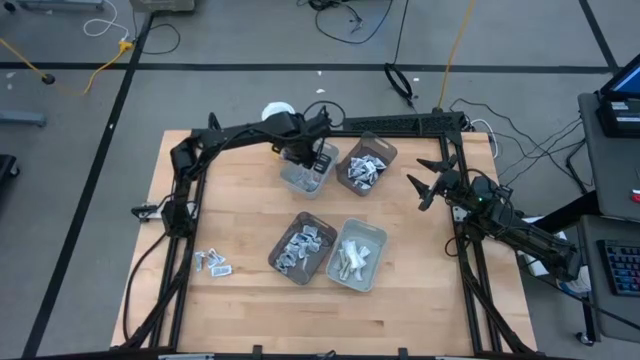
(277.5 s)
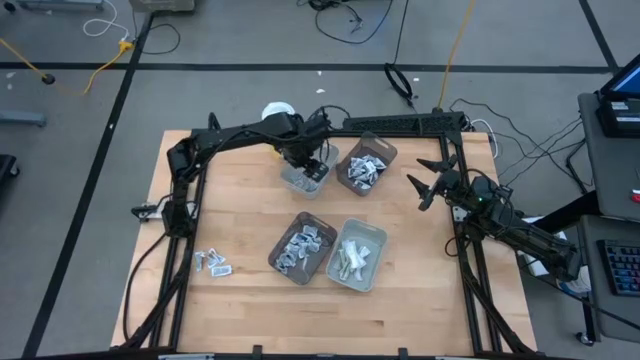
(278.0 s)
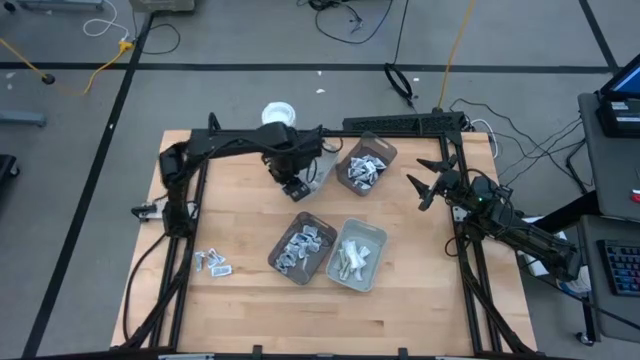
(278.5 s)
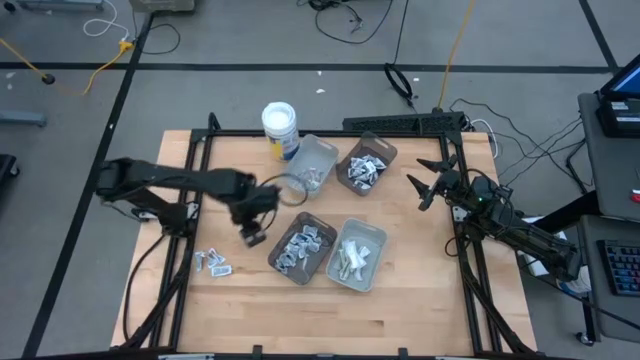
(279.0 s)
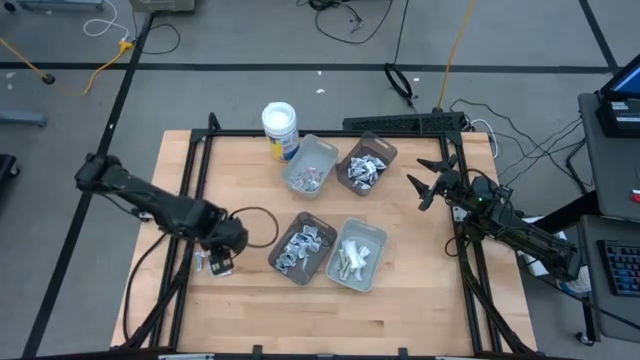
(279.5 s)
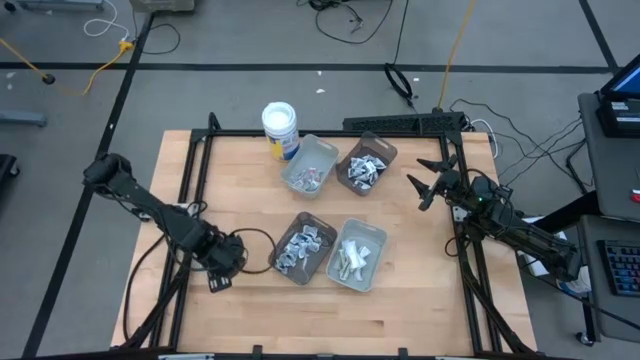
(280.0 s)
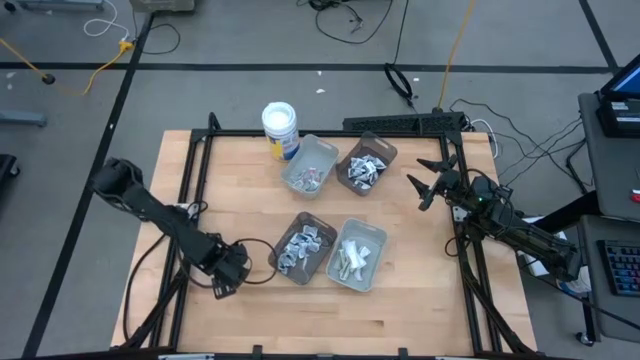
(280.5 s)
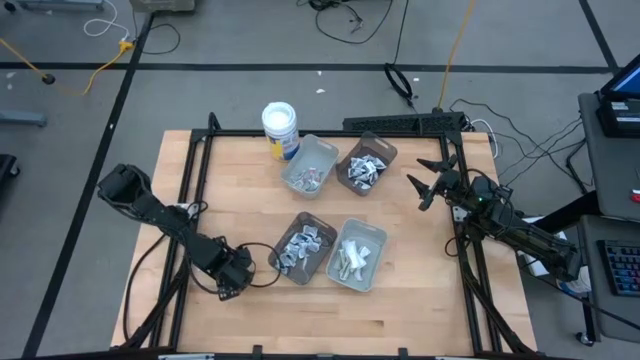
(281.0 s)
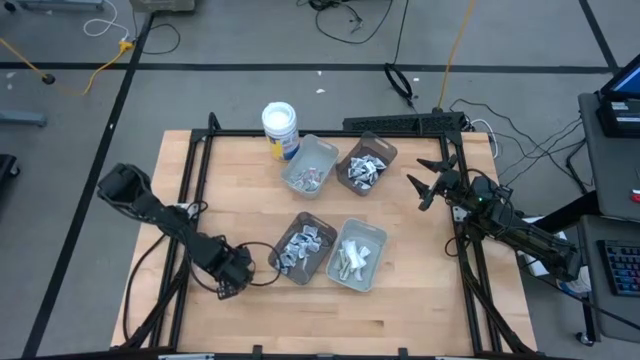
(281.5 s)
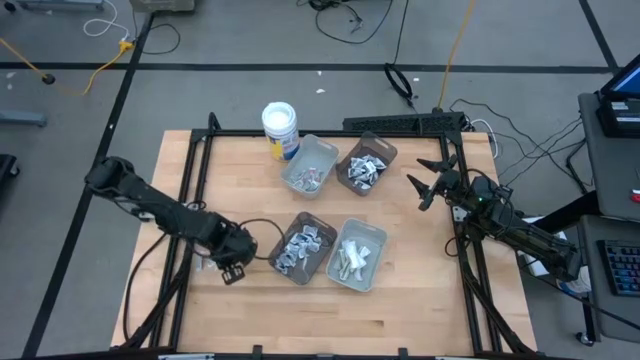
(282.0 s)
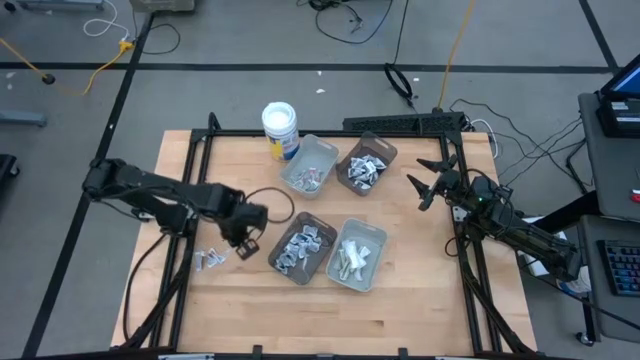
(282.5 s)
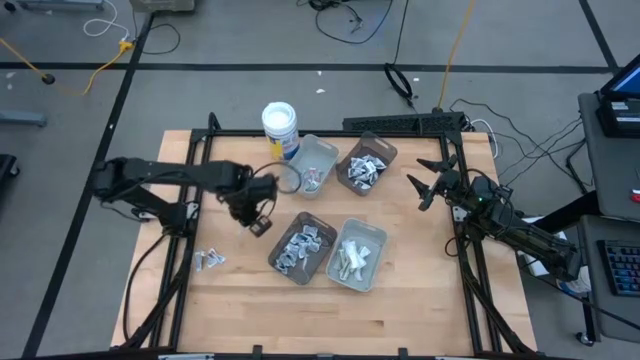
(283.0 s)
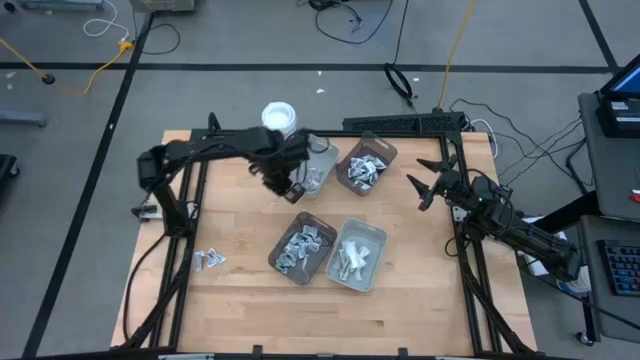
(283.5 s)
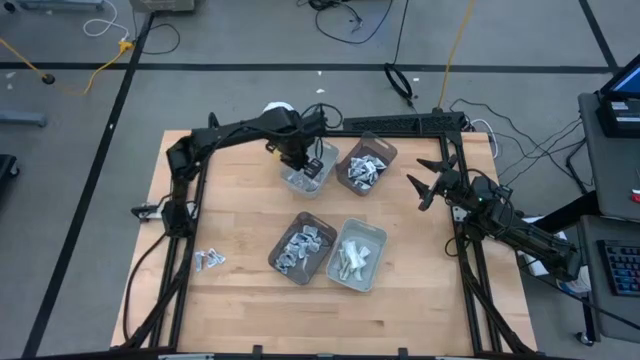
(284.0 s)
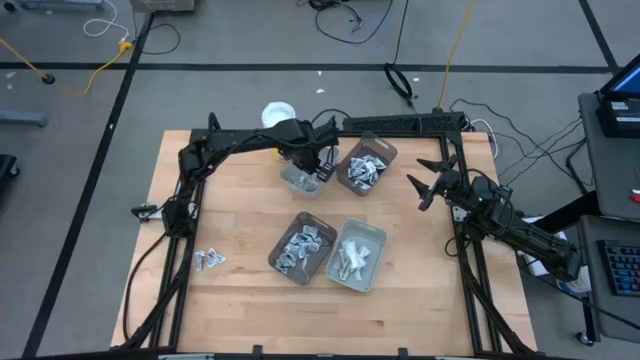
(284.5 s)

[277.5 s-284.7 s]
Task: Pick & Place First Aid Supplies
Put the orange ointment pack into the top gray bin

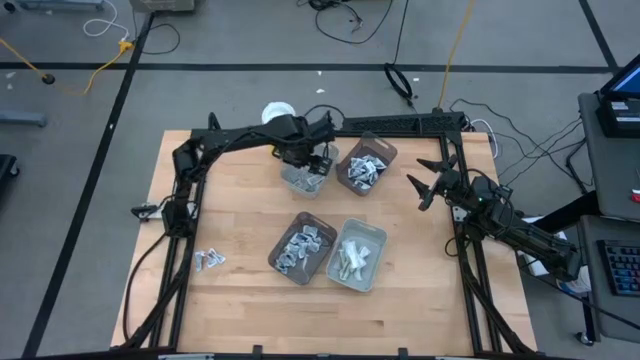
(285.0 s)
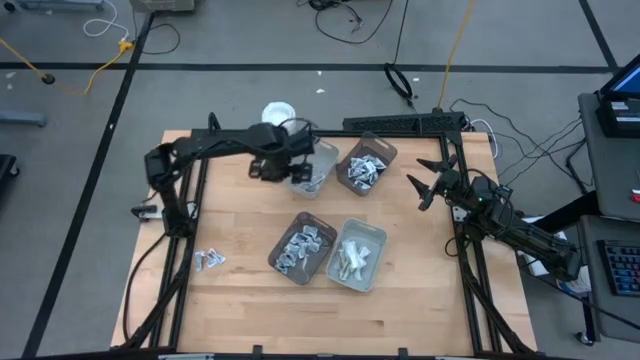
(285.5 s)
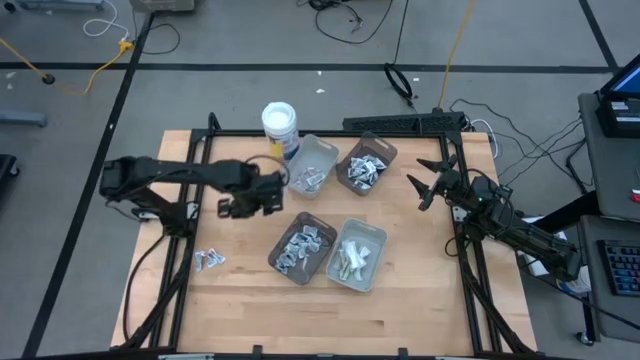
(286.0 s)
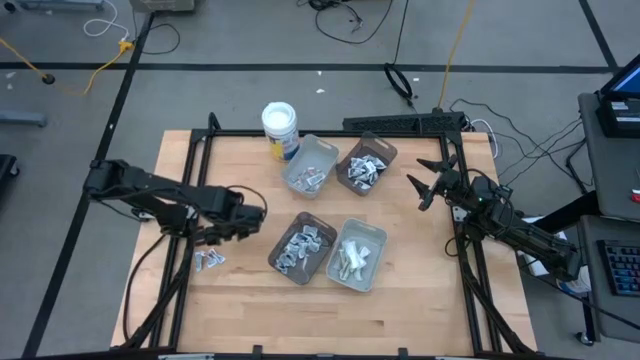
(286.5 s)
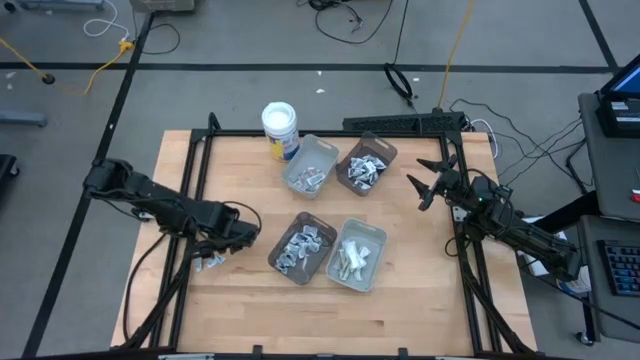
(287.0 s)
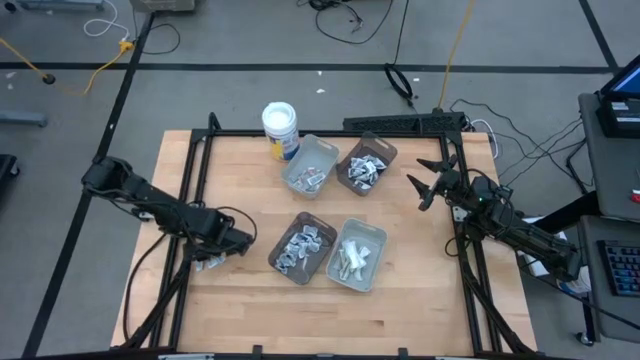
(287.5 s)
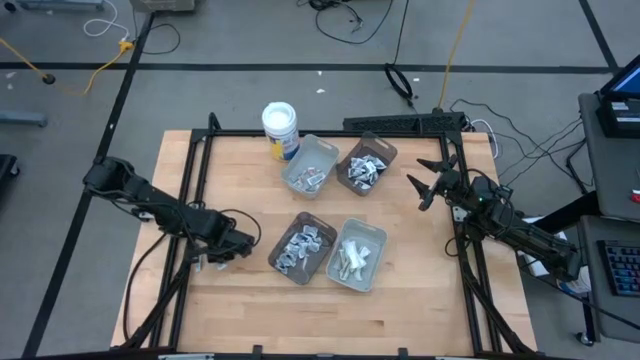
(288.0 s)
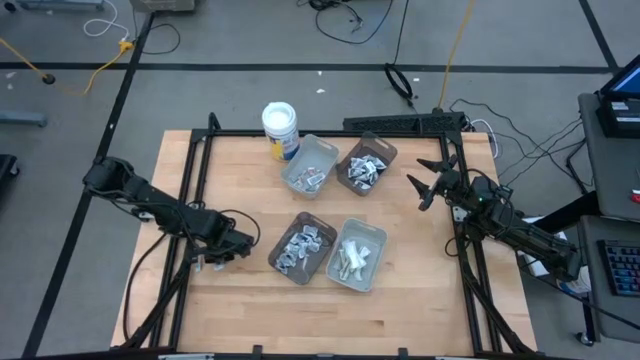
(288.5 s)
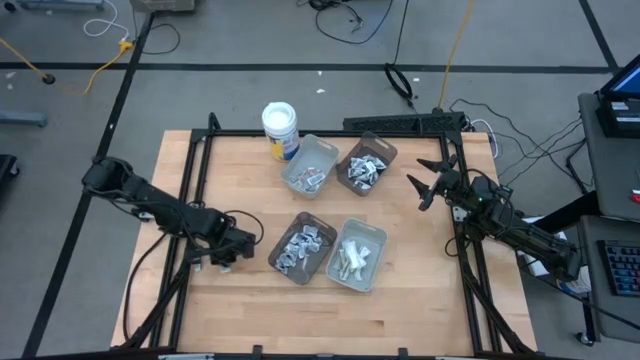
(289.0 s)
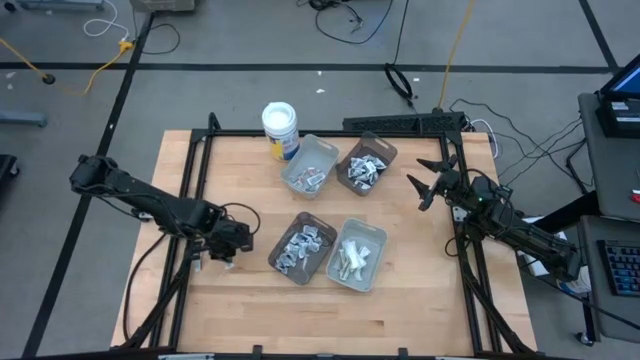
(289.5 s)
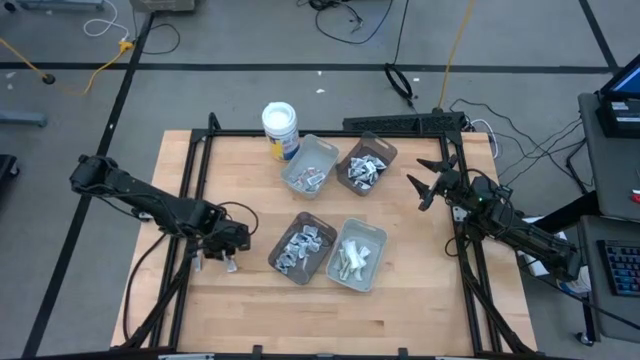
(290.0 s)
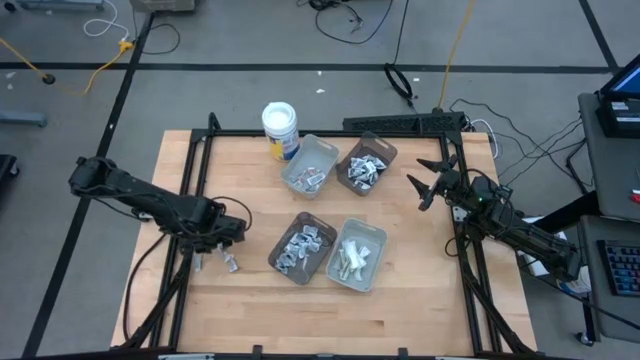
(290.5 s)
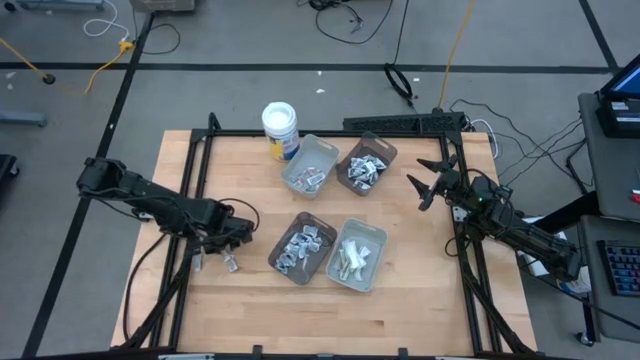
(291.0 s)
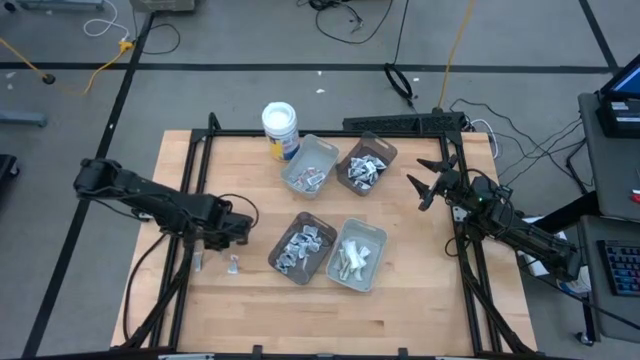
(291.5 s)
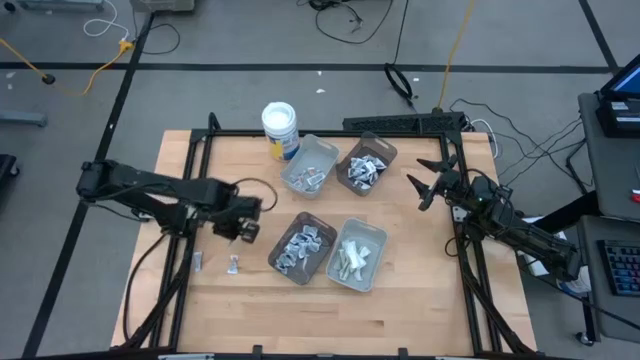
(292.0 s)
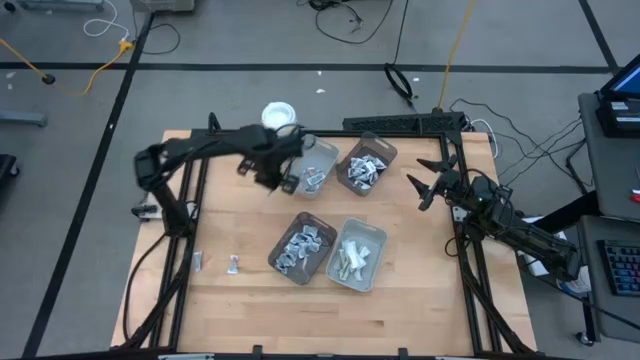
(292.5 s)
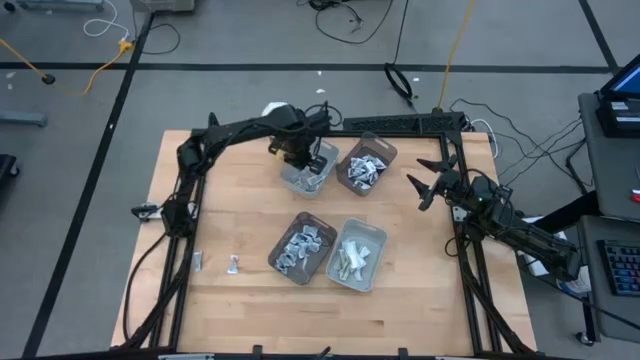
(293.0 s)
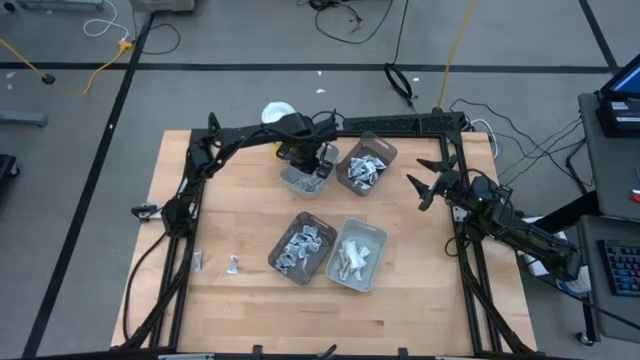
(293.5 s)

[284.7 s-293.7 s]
Put the orange ointment pack into the top gray bin

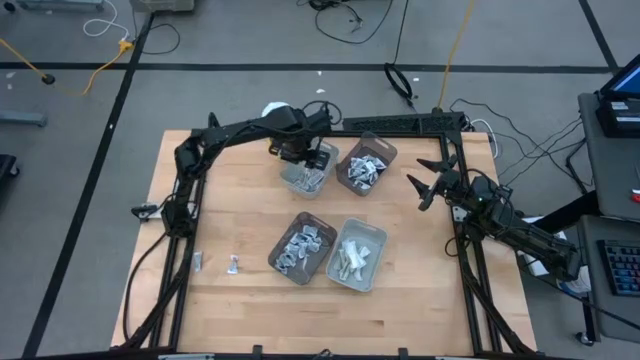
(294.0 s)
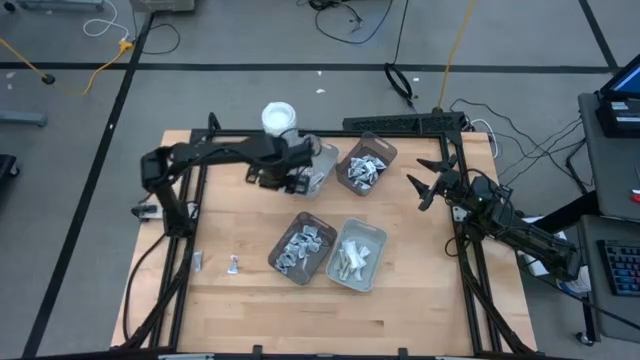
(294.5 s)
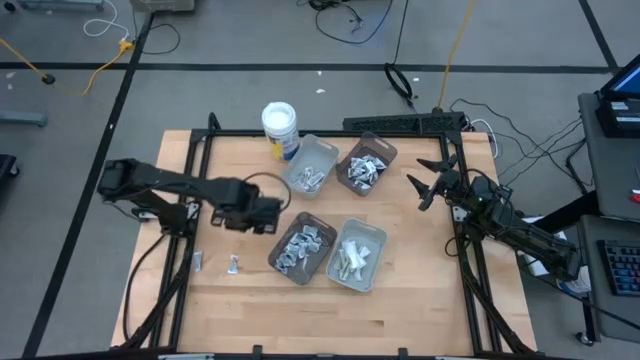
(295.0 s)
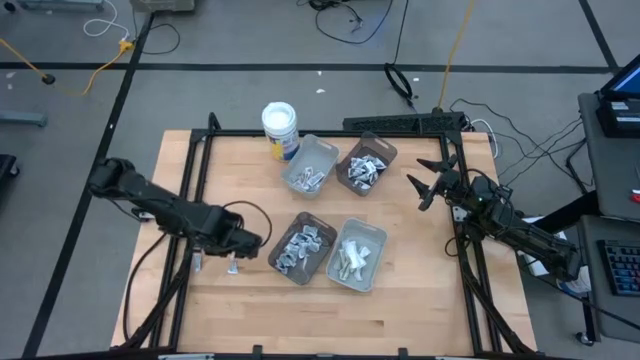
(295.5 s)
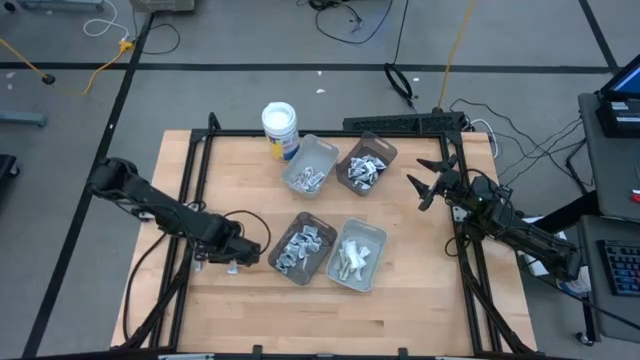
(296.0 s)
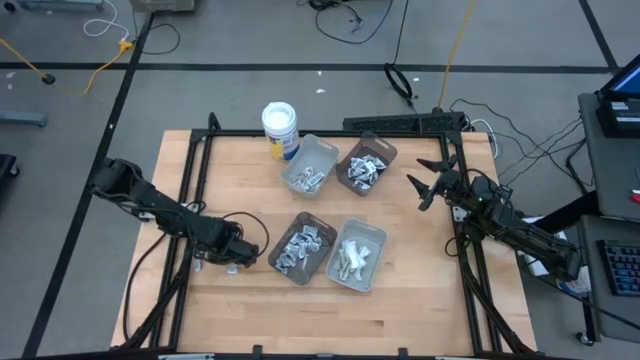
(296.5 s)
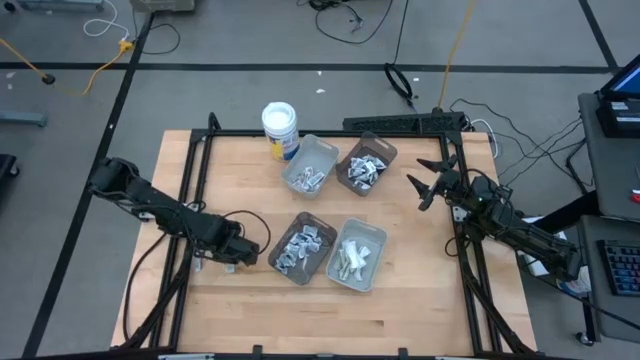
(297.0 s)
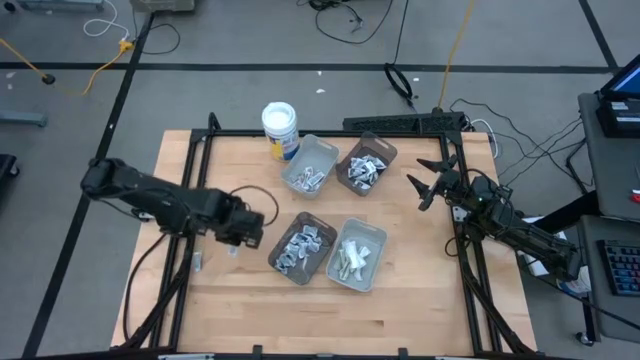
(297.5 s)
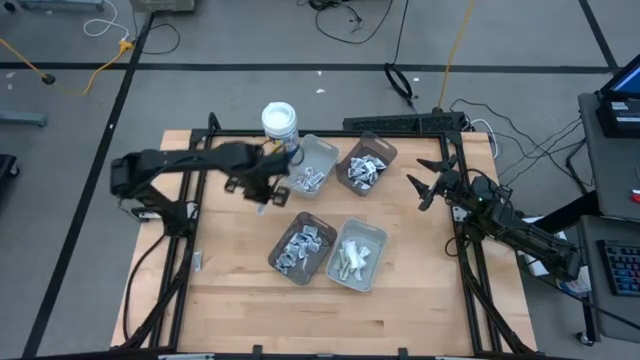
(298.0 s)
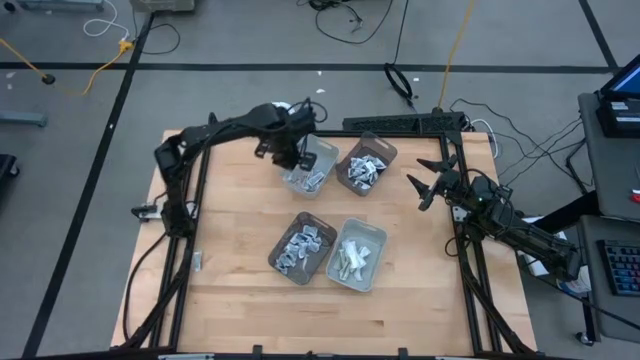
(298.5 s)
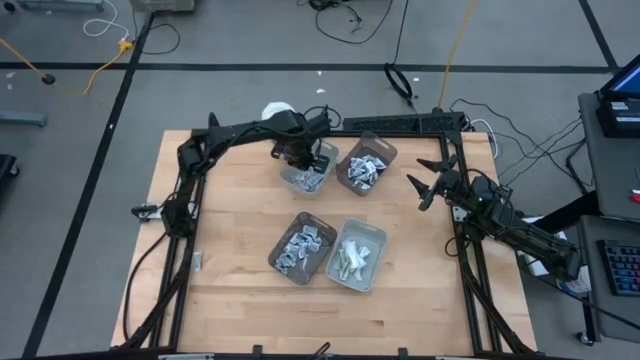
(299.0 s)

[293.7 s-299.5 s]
Put the orange ointment pack into the top gray bin
